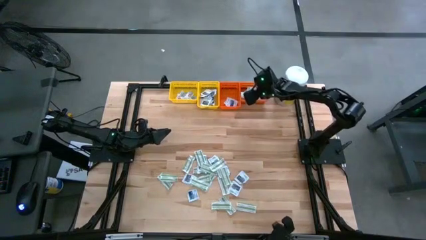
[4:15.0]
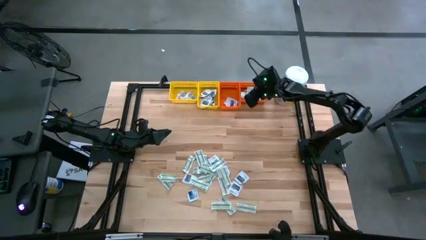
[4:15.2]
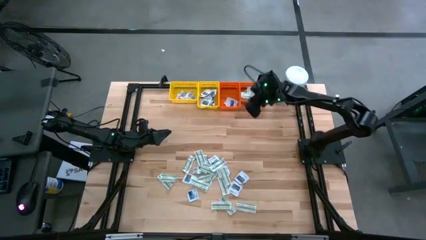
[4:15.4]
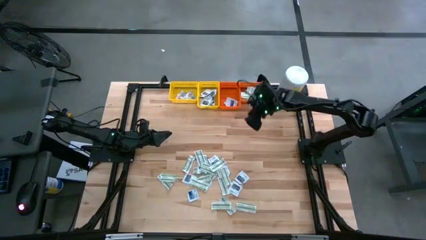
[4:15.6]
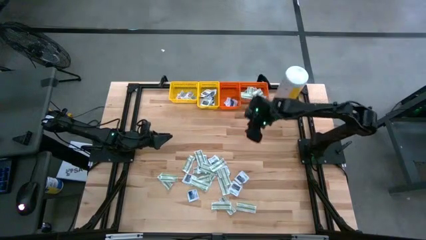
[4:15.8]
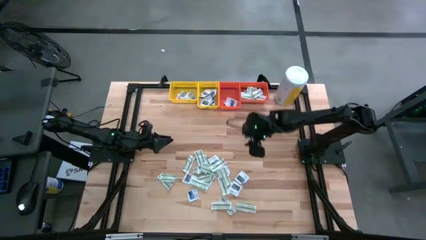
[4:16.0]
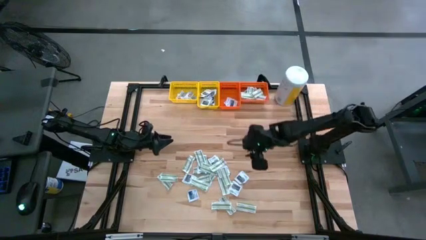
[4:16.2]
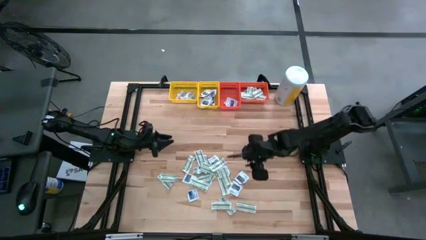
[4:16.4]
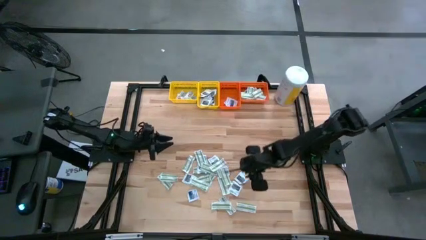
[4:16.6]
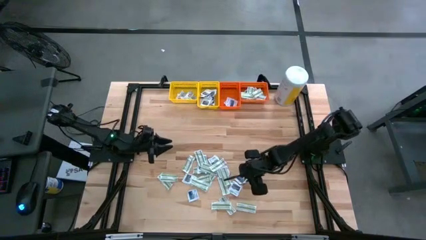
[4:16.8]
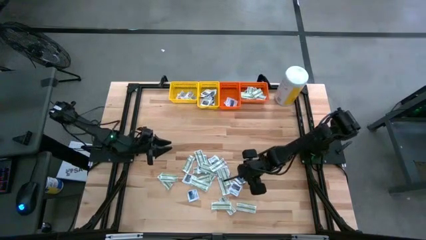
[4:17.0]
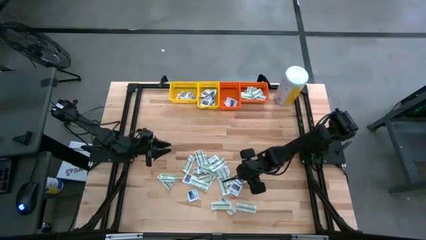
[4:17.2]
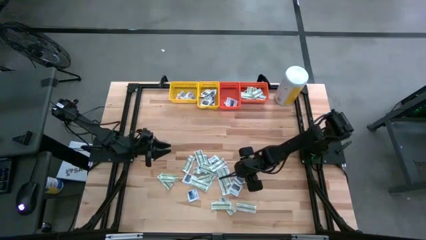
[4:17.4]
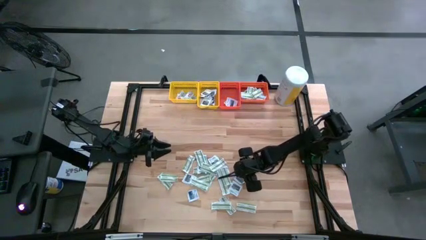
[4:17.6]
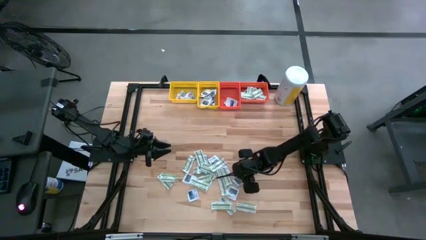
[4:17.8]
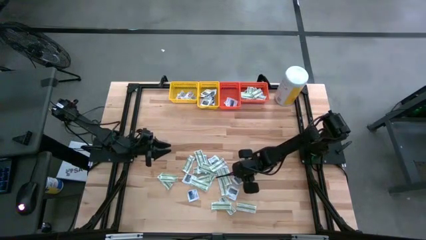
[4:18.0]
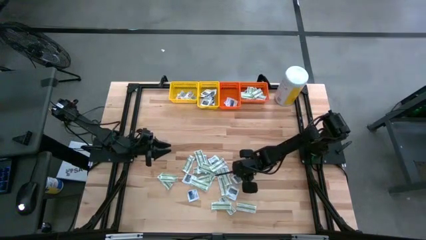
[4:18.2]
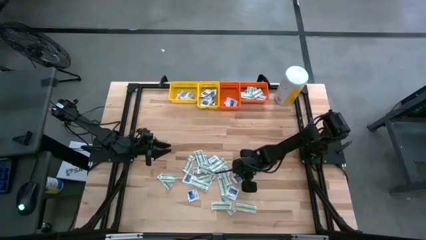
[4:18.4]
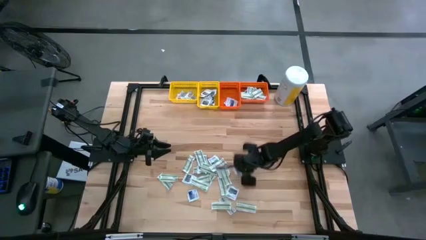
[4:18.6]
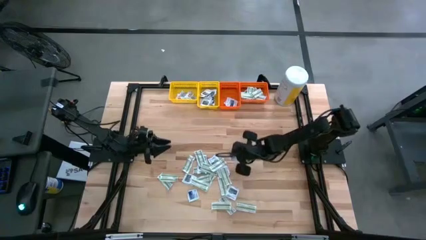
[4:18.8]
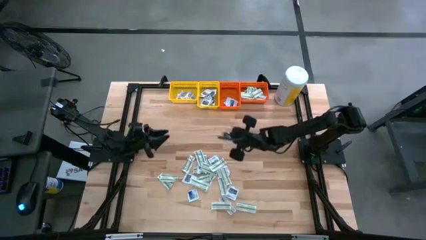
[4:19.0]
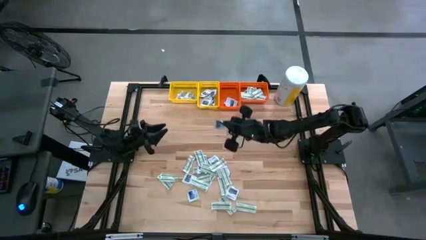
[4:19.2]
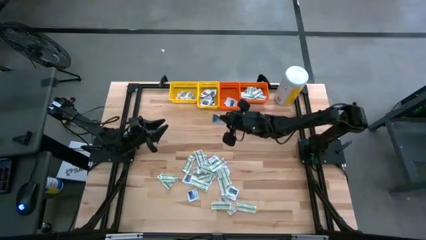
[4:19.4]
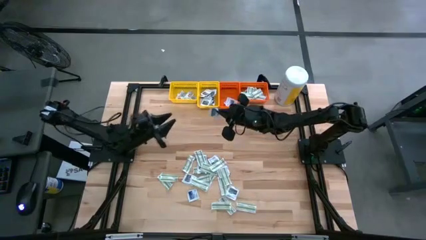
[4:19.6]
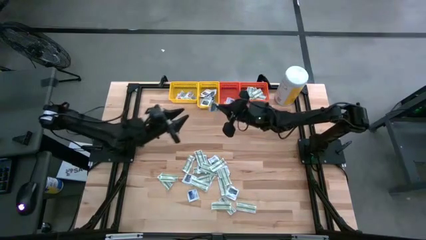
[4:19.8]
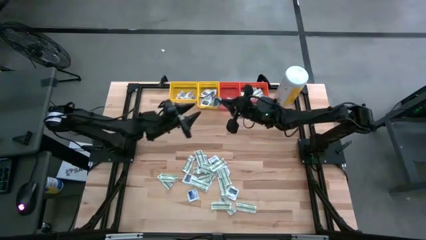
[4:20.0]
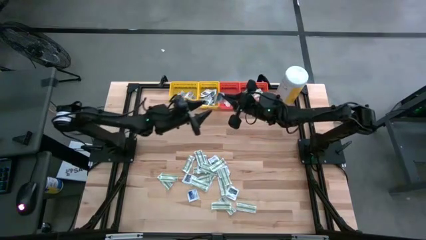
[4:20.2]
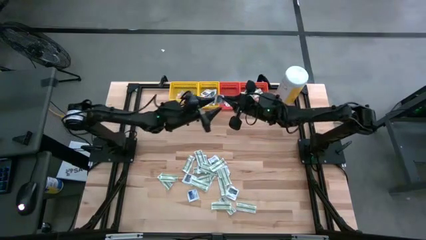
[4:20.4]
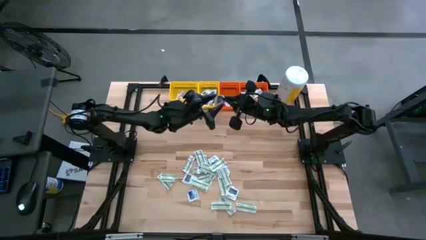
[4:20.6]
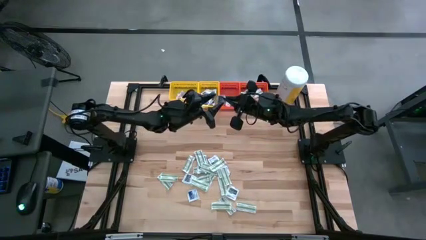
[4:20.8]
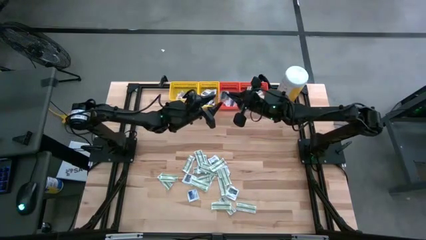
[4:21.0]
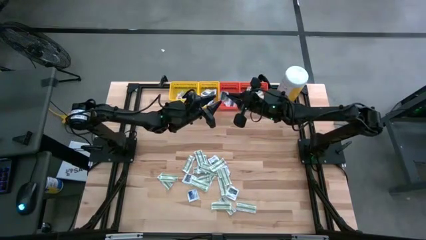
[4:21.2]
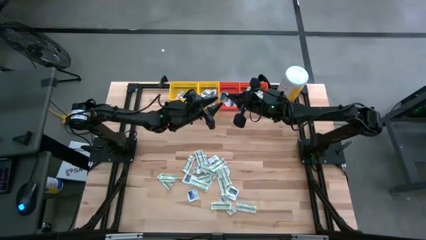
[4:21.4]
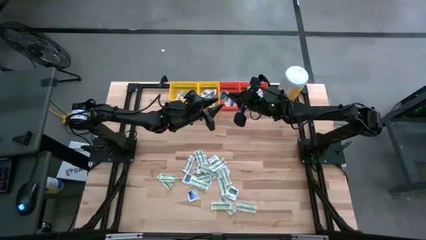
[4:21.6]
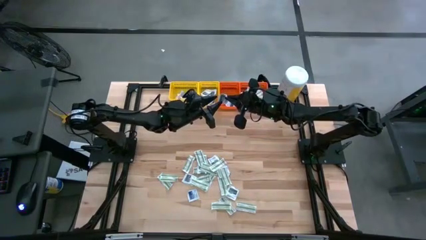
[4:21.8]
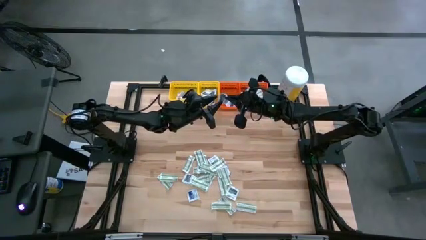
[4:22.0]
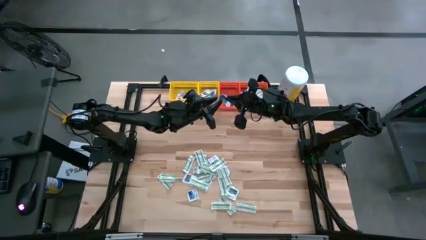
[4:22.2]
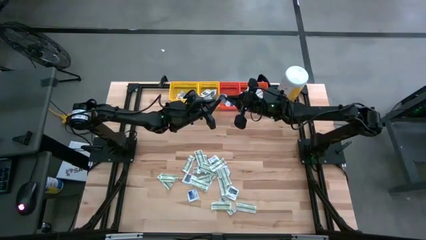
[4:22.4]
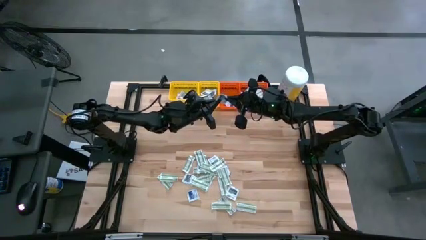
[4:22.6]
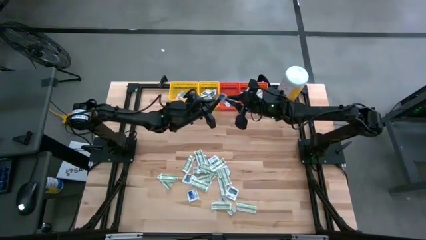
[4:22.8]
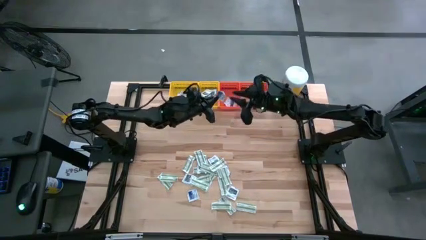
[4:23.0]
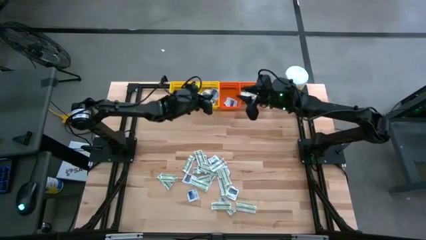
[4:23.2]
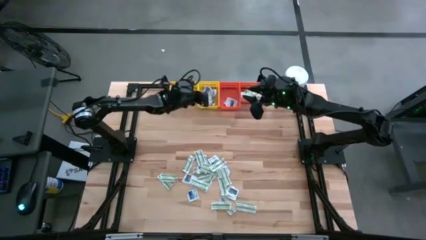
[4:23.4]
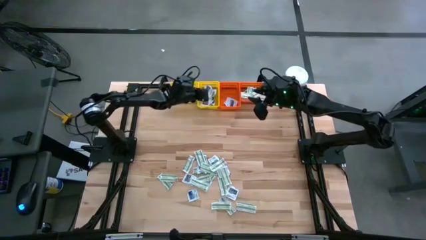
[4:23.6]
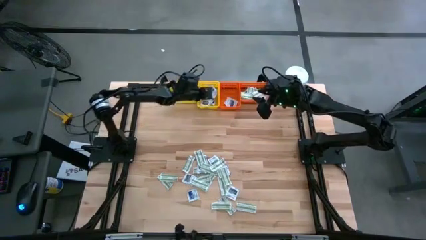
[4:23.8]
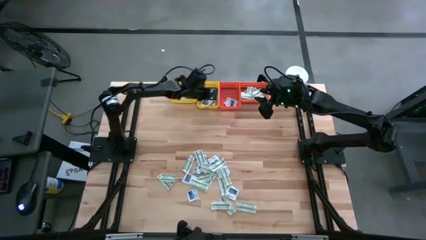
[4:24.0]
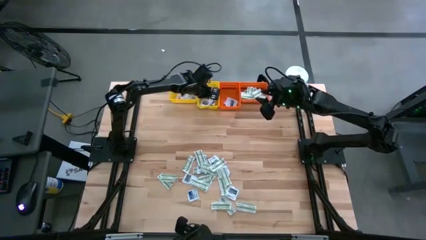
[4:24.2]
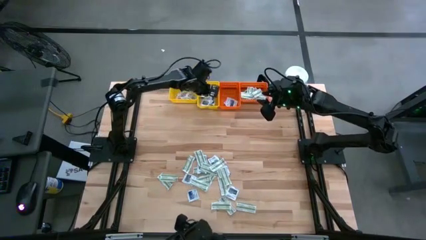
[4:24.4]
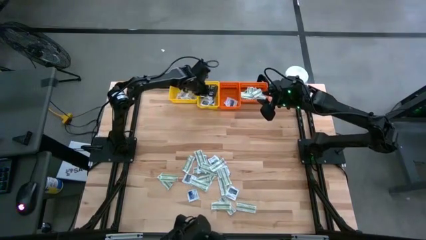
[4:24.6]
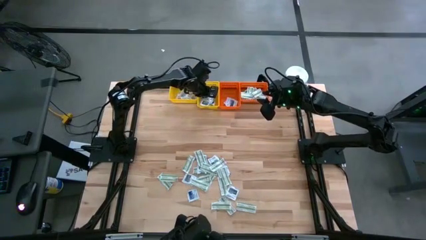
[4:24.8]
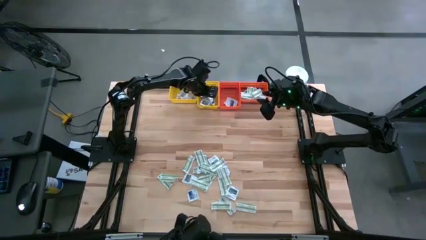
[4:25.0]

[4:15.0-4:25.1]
Task: Pick & Place First Aid Supplies
Put the gray packet into the right yellow bin

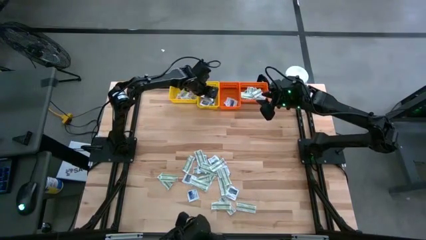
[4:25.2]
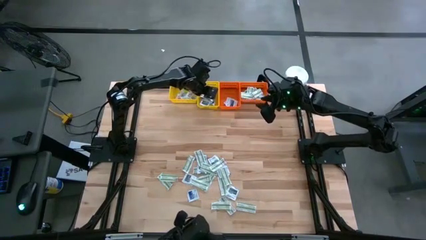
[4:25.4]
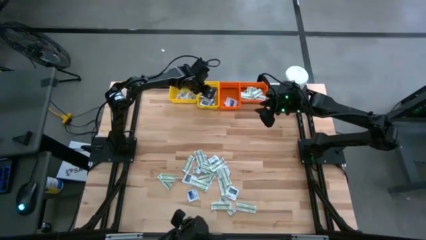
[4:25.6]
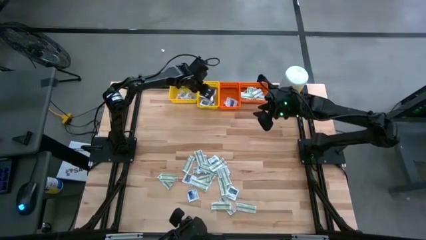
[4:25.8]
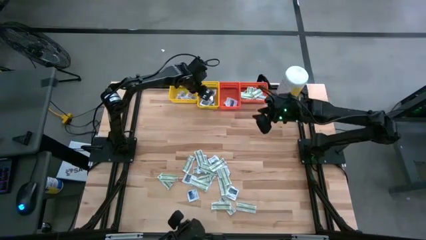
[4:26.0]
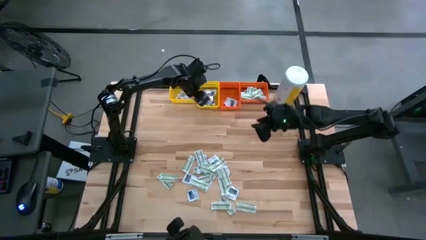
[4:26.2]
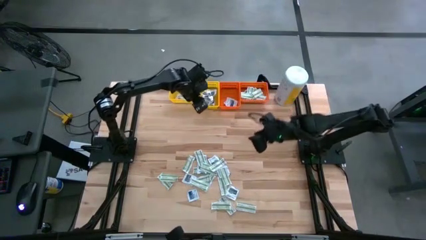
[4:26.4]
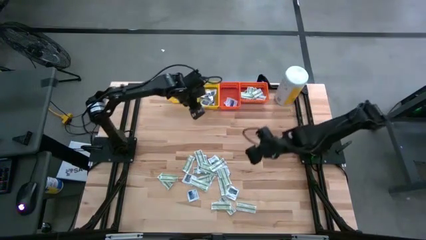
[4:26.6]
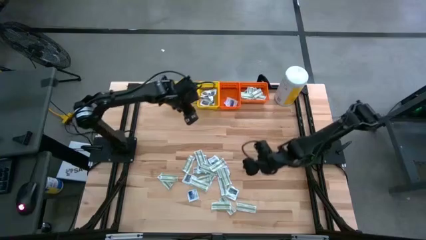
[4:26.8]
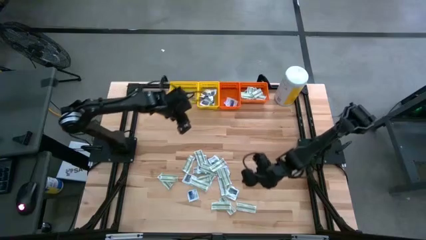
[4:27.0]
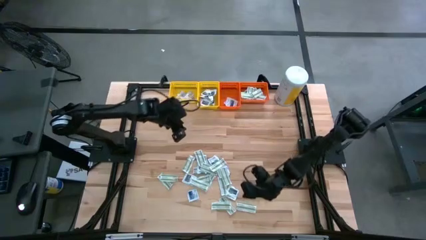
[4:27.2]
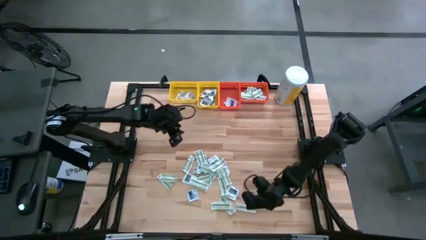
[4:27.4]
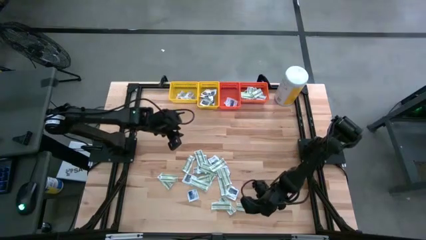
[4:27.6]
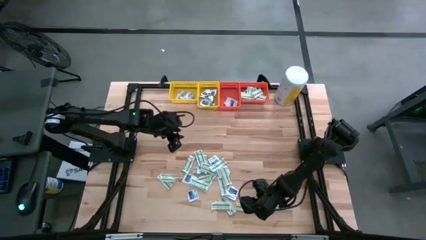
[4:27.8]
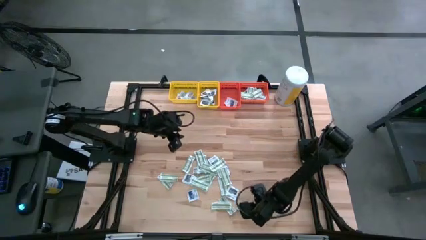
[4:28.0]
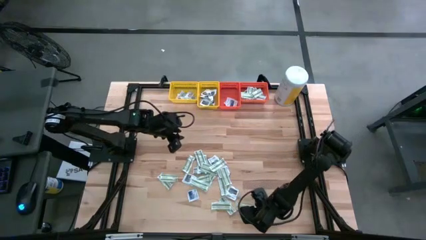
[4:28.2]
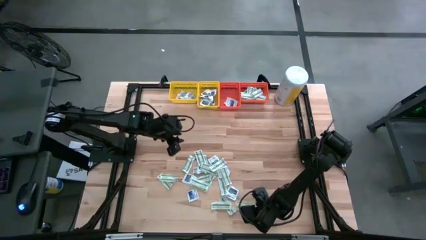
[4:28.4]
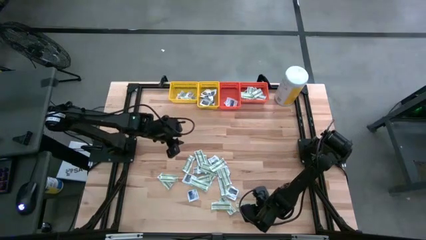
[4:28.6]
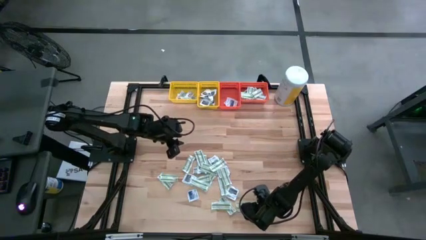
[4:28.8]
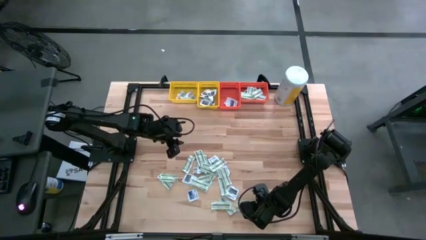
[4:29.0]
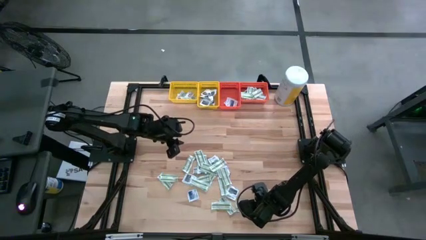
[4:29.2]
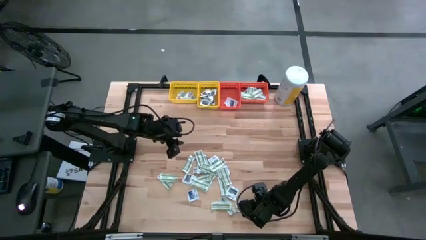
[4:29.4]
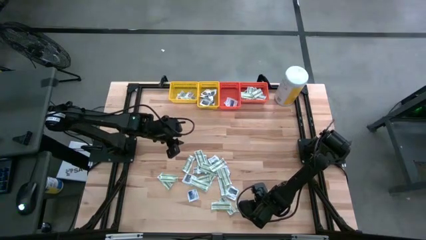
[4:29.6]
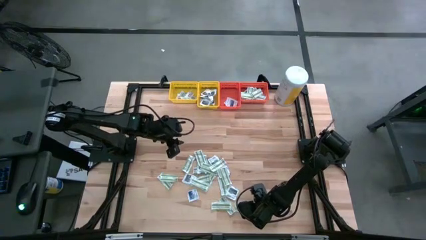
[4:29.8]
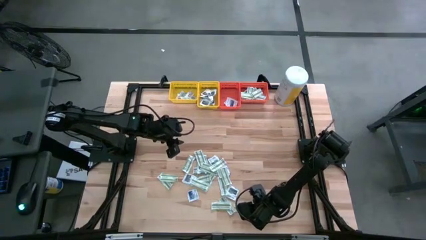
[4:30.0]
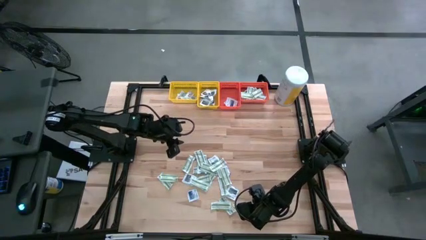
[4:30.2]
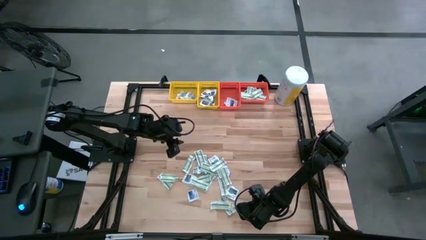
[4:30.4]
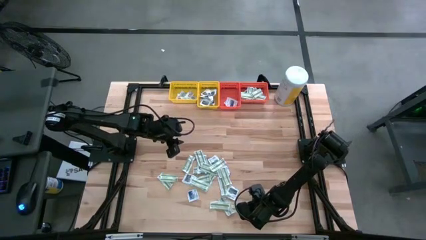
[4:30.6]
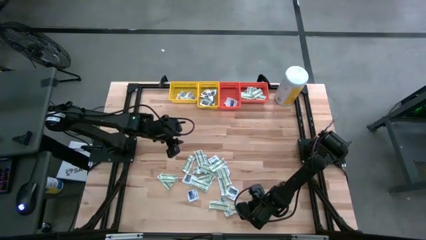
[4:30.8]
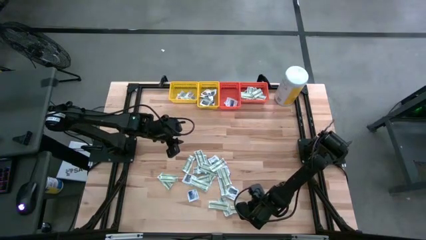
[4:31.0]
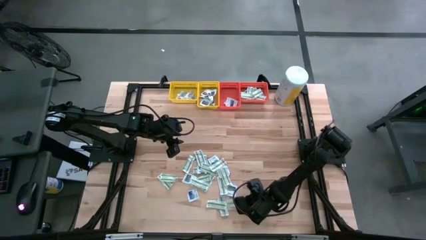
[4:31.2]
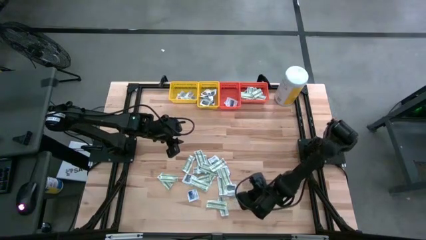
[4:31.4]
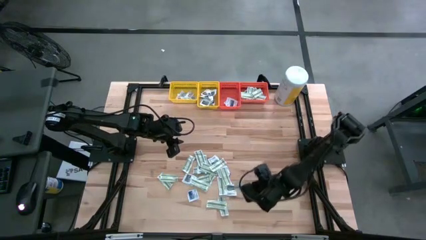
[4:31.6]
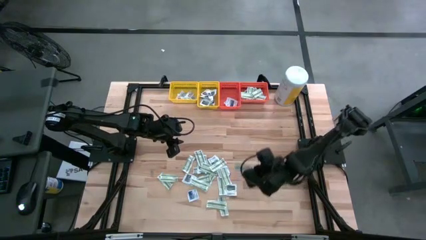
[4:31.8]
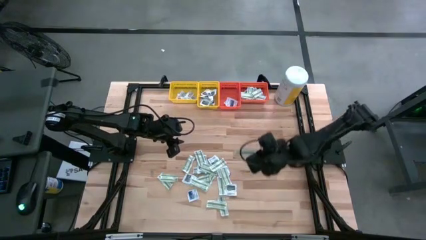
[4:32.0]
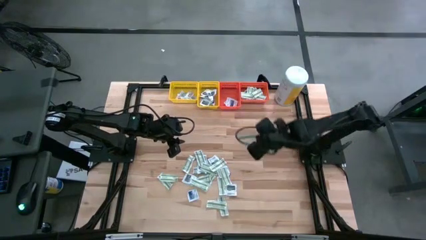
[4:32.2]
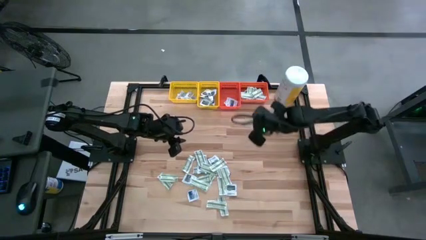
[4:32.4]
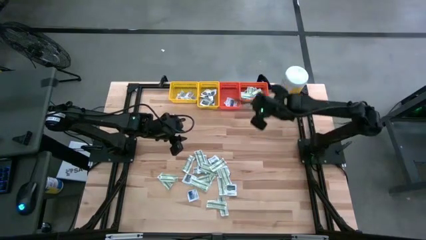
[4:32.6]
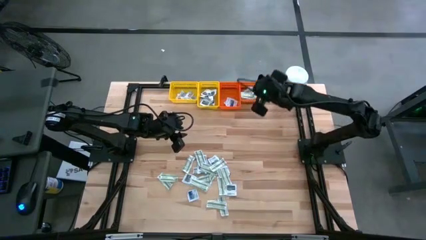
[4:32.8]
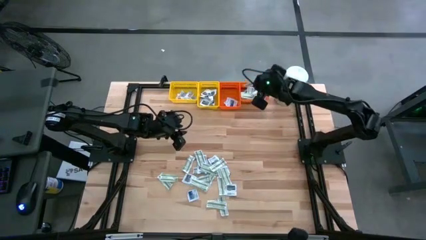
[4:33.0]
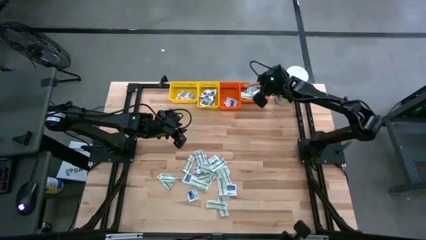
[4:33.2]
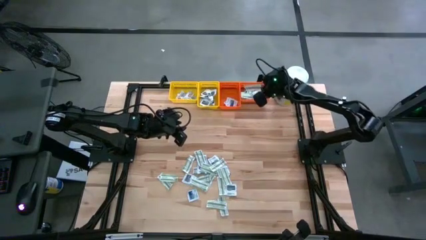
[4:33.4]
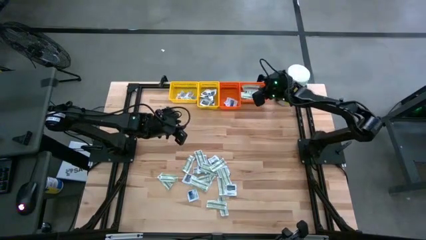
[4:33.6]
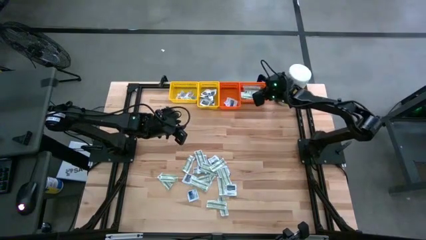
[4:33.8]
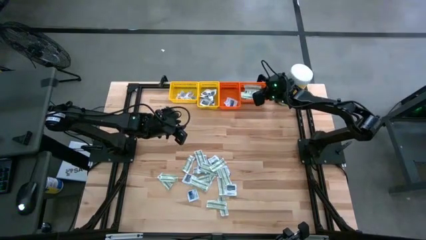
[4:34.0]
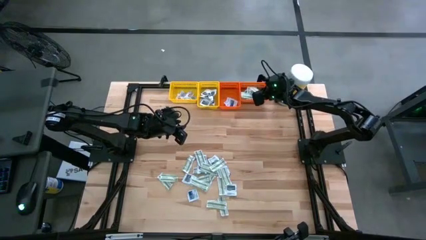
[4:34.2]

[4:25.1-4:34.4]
Put the green pad into the right orange bin
